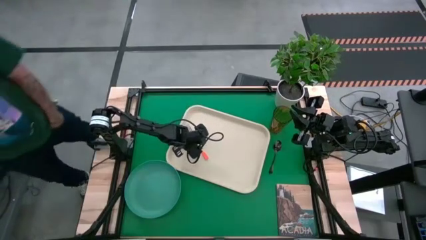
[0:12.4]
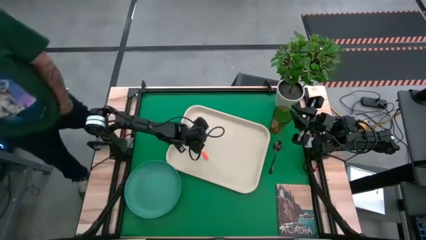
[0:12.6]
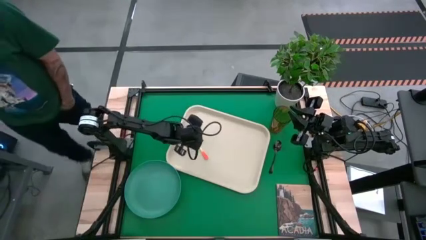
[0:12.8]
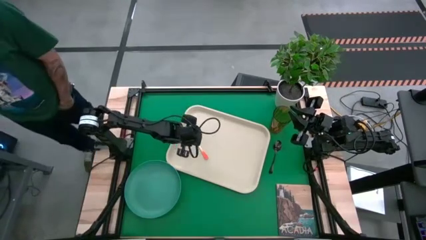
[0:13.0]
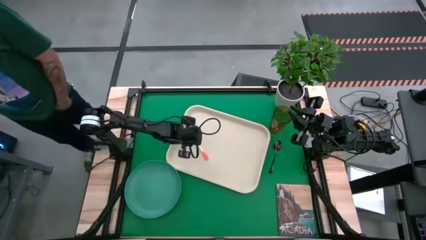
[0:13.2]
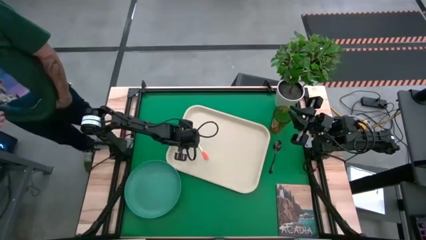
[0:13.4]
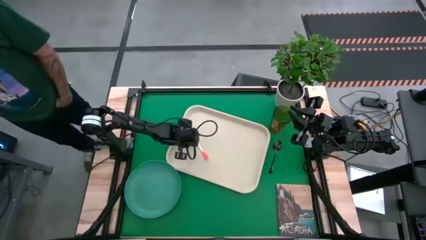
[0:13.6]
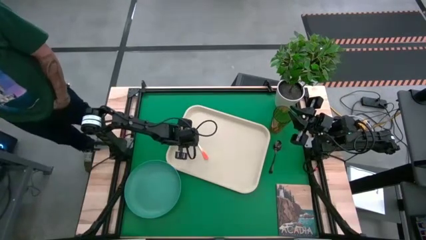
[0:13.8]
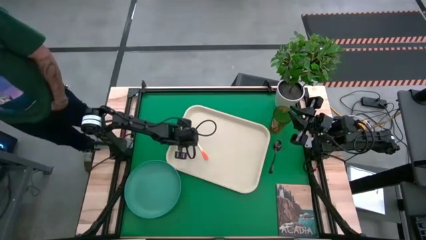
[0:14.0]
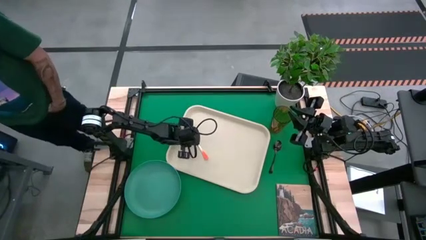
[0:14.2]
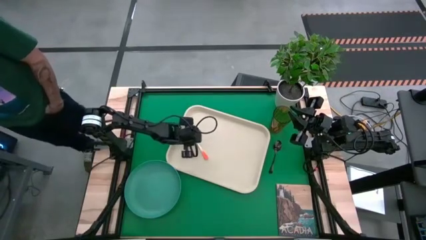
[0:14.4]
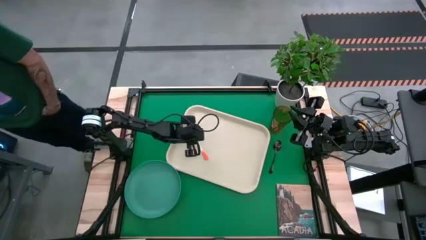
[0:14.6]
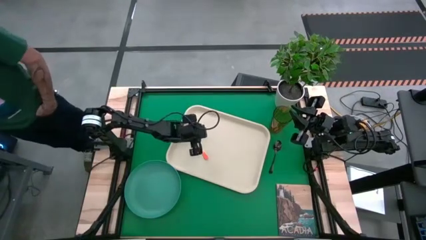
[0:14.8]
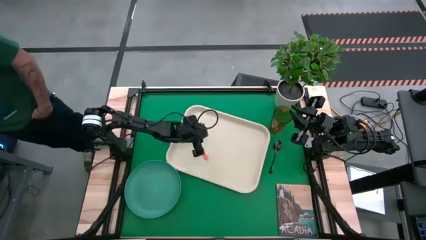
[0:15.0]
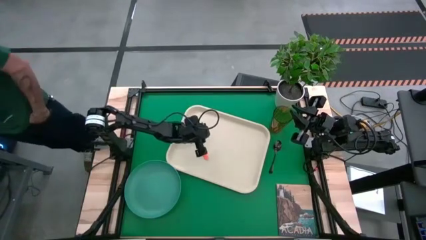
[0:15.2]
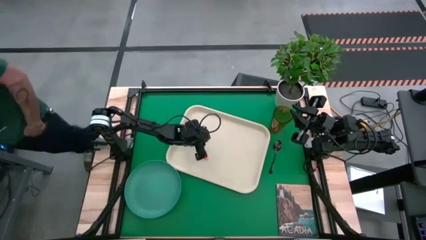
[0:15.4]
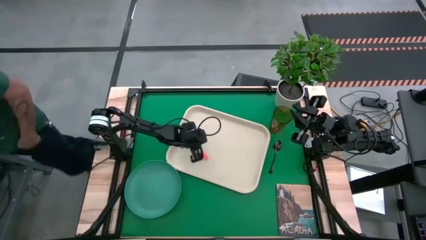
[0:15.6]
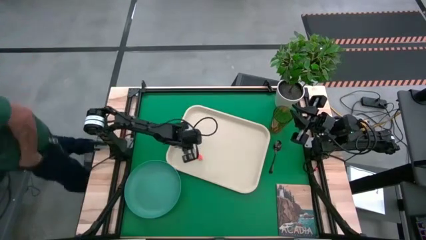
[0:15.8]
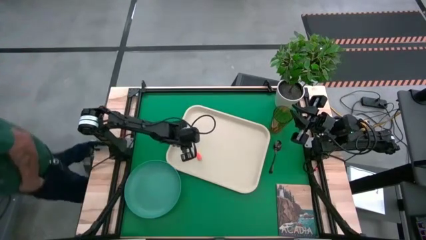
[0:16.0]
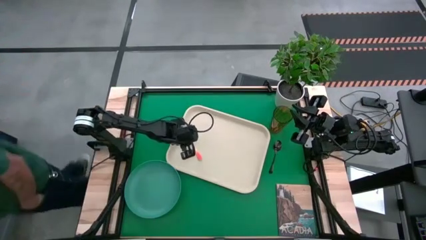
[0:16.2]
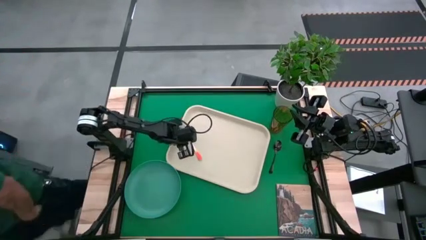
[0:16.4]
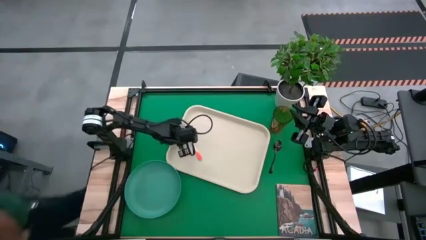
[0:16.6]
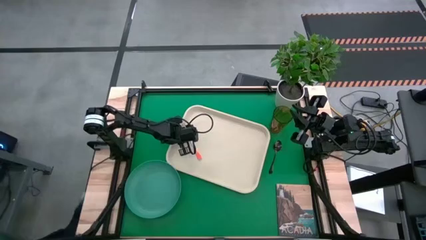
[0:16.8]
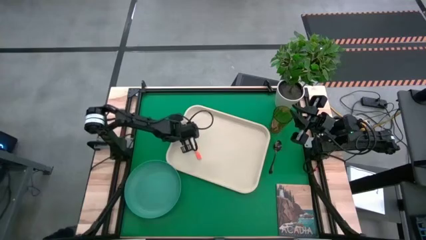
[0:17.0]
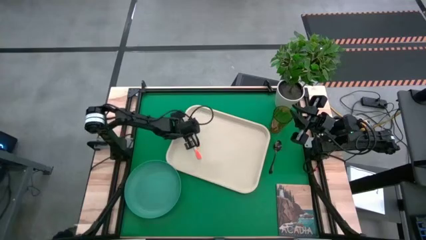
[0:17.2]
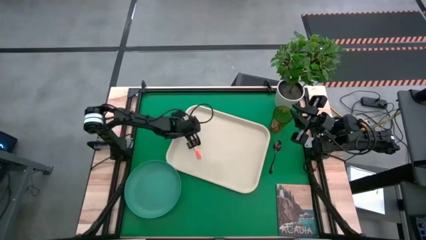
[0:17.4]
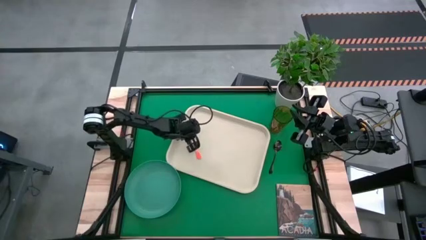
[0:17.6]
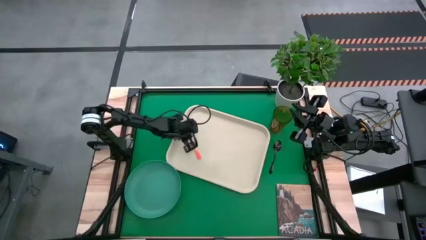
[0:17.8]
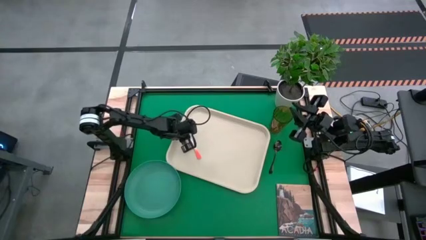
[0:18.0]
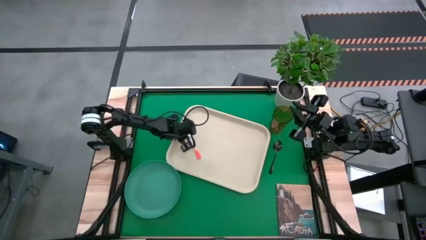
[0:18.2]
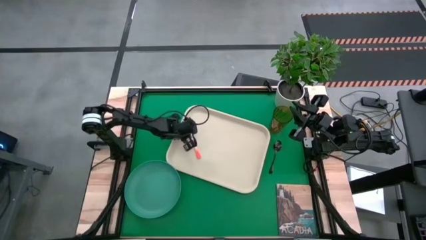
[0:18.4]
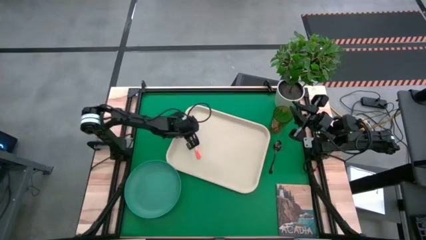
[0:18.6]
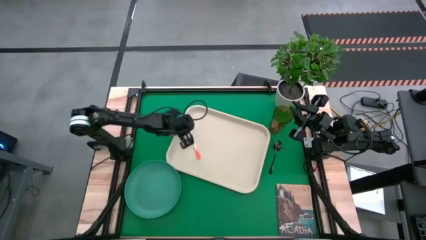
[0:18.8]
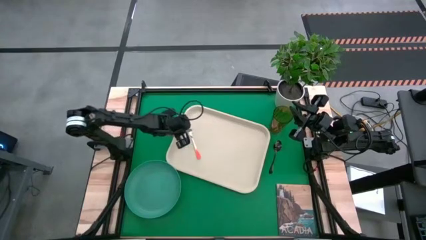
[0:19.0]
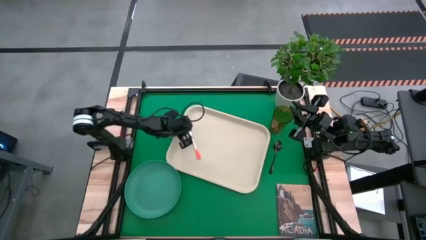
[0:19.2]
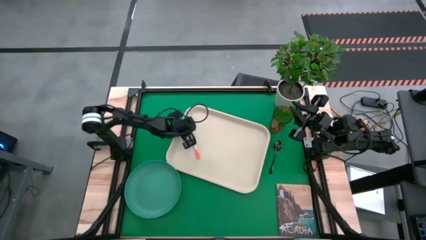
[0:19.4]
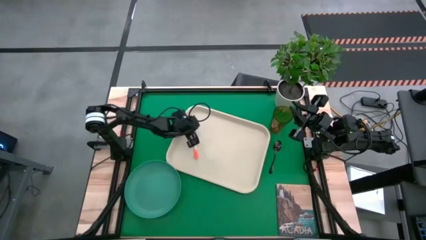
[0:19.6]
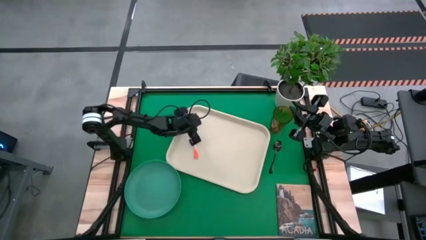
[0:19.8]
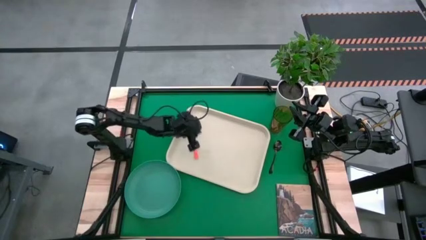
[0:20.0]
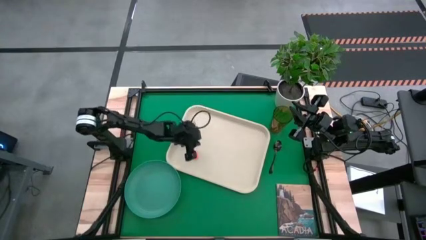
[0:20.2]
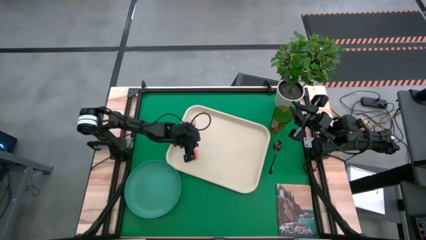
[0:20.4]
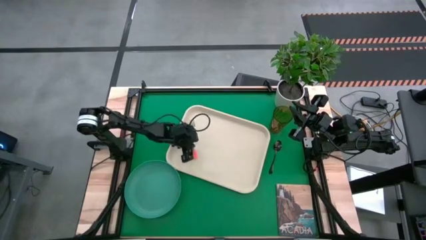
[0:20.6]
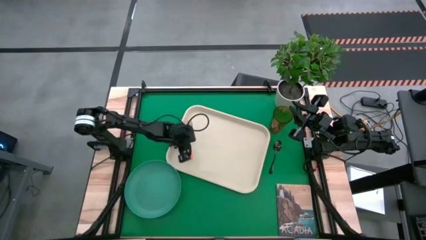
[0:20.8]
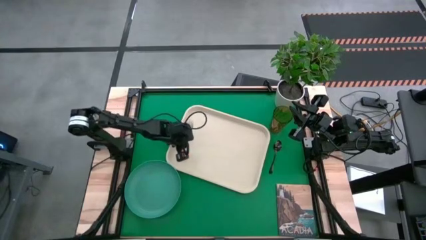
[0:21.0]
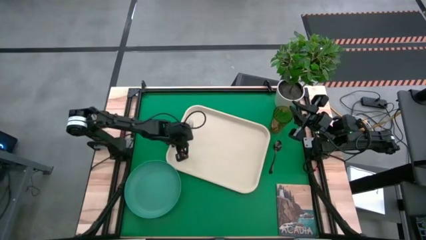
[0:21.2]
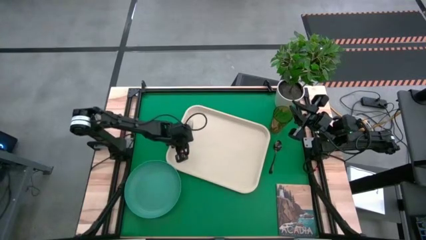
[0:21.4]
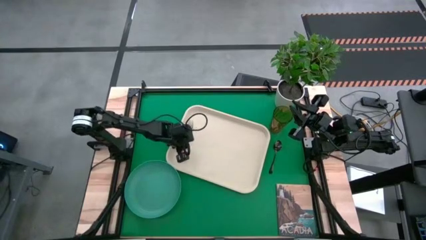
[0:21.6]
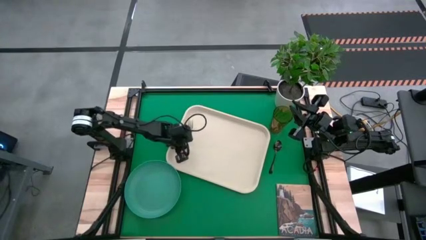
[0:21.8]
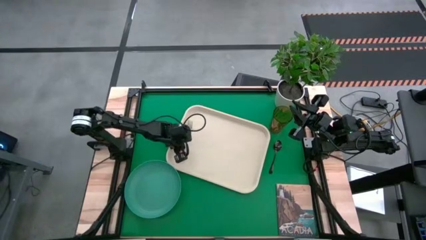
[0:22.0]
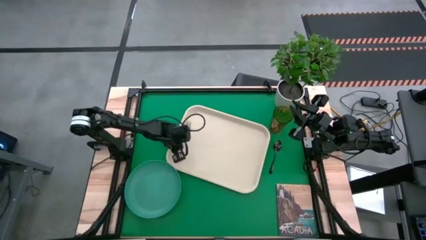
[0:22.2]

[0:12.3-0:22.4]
Task: Pick and place plate/cup/fork/spoon on tray
Put the orange fork on the left of the white tray

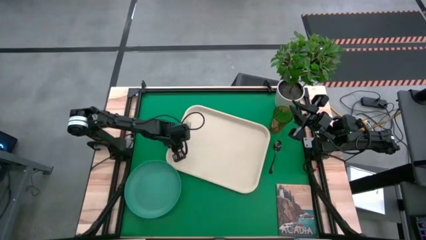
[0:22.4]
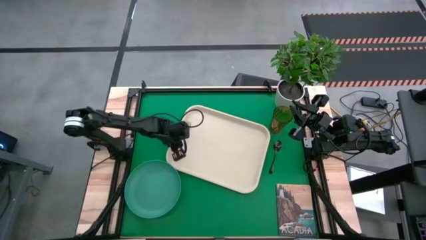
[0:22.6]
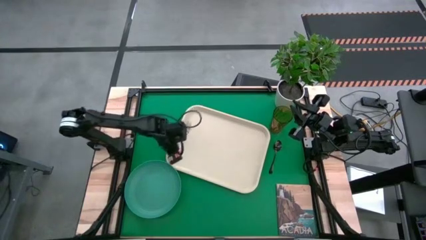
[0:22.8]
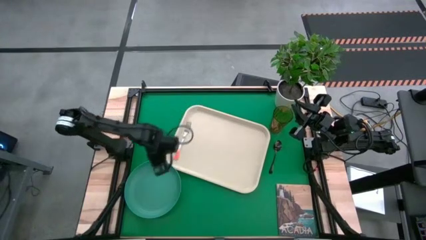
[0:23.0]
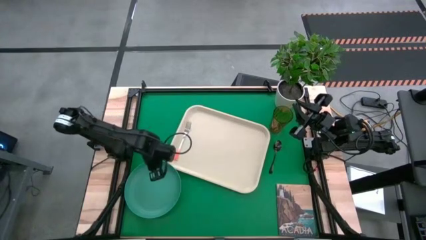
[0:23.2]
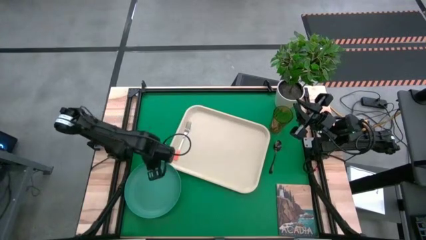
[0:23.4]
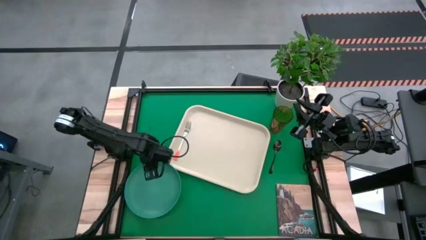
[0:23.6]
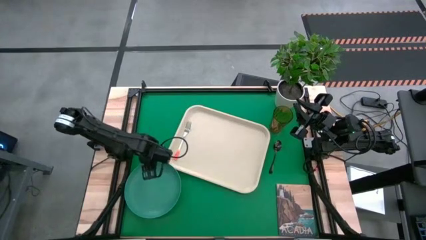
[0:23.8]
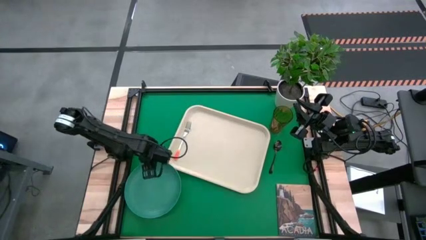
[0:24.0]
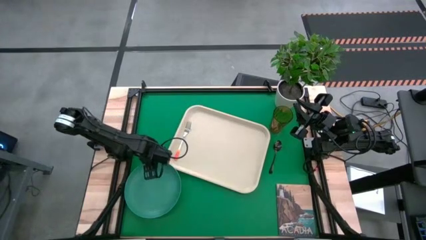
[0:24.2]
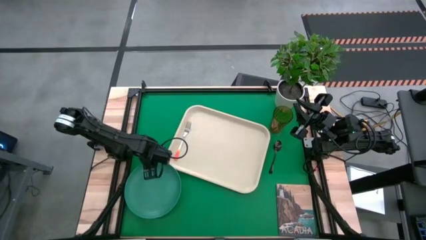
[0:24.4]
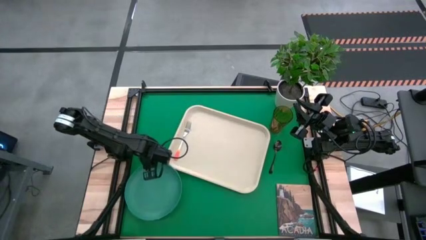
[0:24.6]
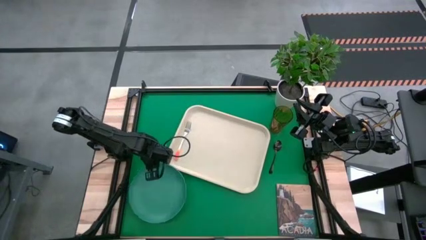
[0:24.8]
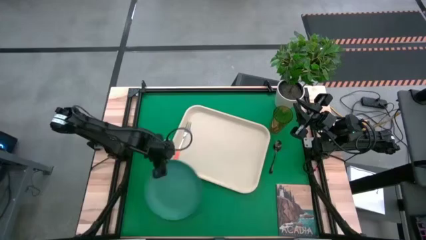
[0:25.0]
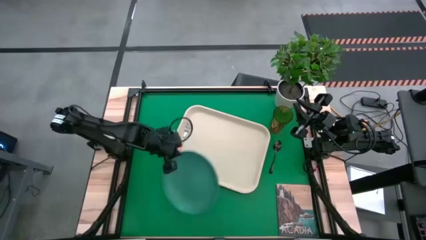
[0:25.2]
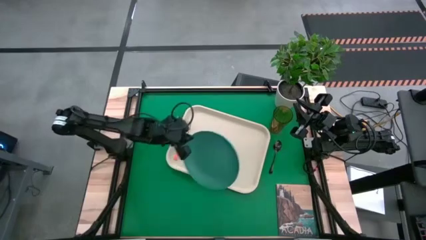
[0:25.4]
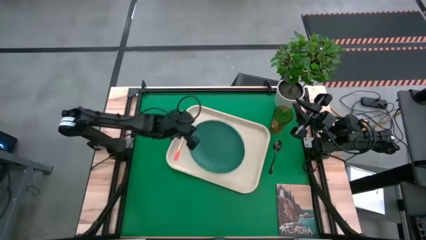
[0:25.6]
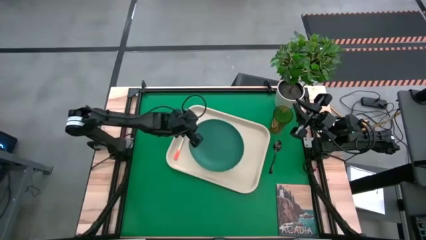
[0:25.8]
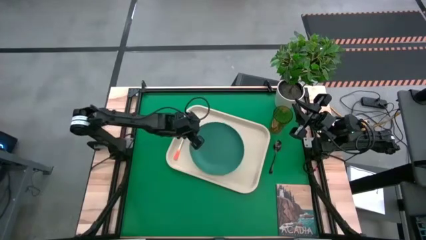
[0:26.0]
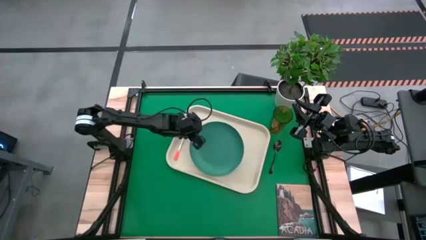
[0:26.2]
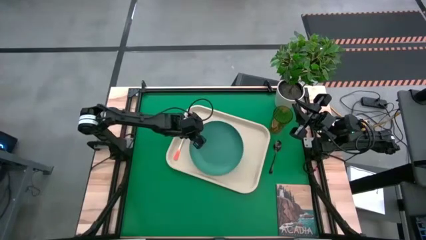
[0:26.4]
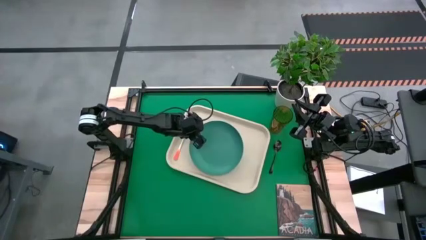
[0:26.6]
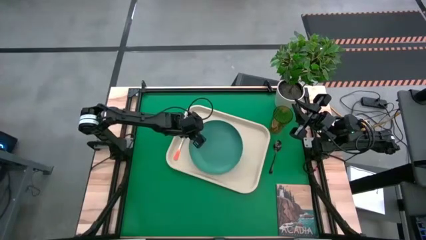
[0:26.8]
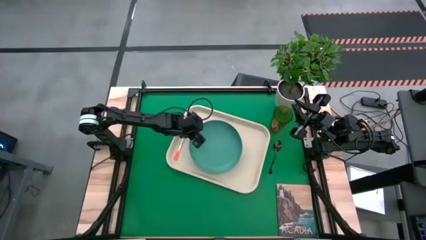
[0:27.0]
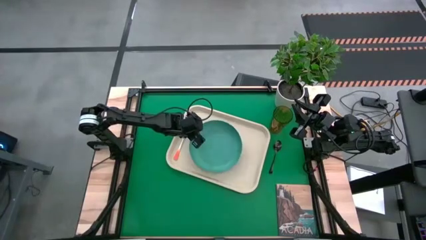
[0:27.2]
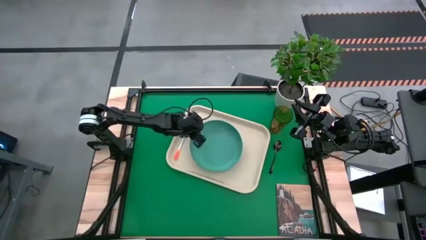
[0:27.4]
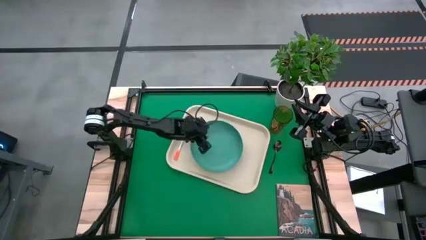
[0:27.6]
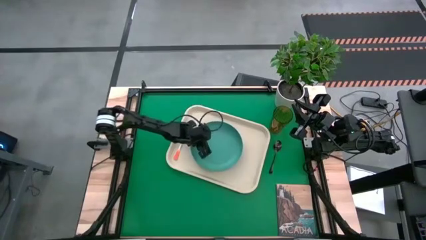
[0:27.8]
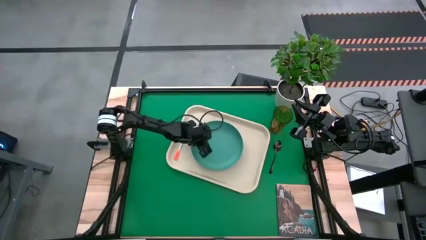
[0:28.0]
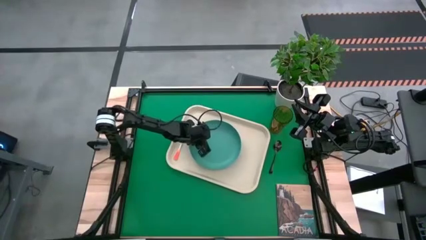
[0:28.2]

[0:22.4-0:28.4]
Put the green plate on the white tray to the right of the orange fork
